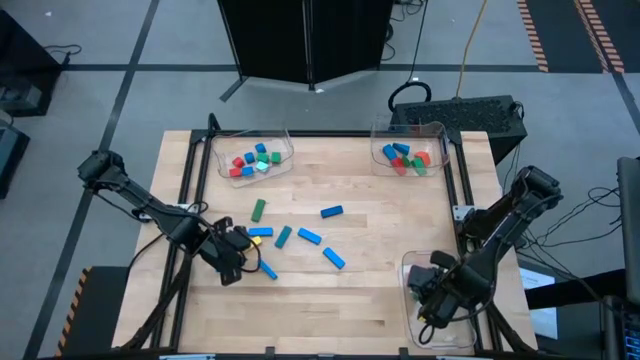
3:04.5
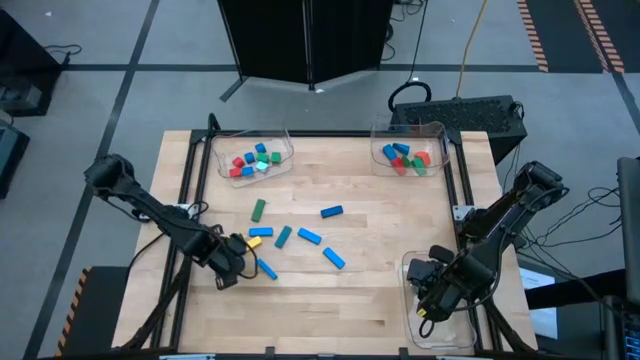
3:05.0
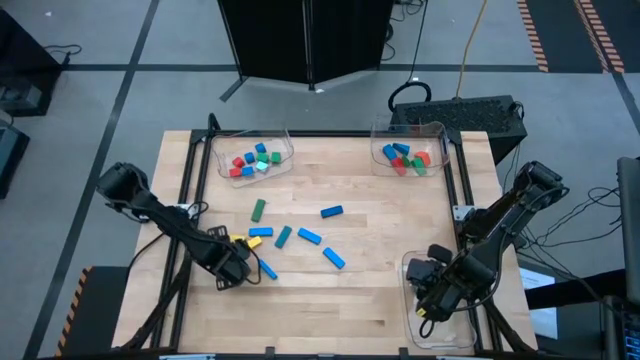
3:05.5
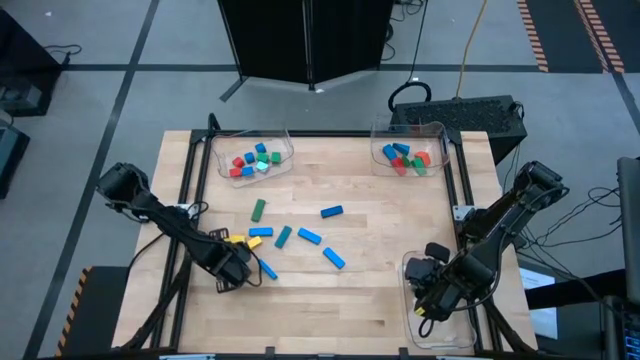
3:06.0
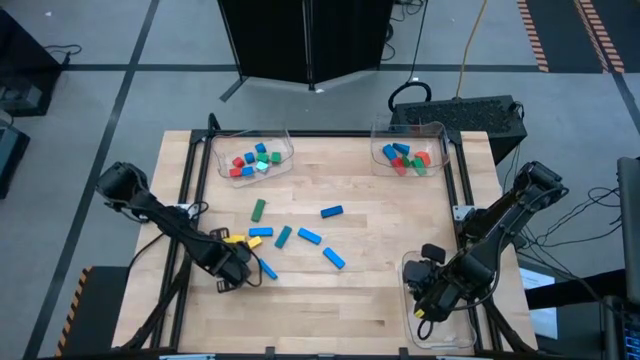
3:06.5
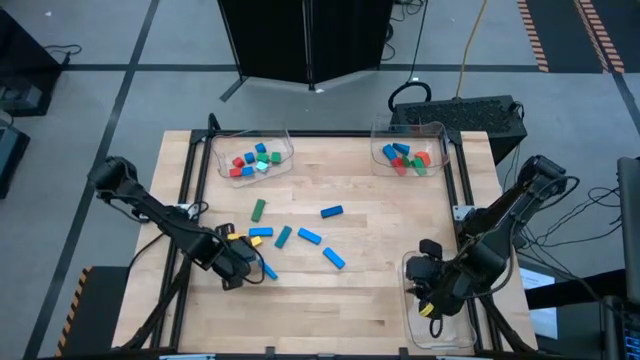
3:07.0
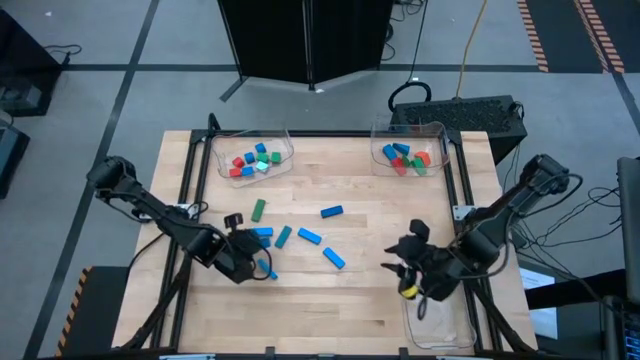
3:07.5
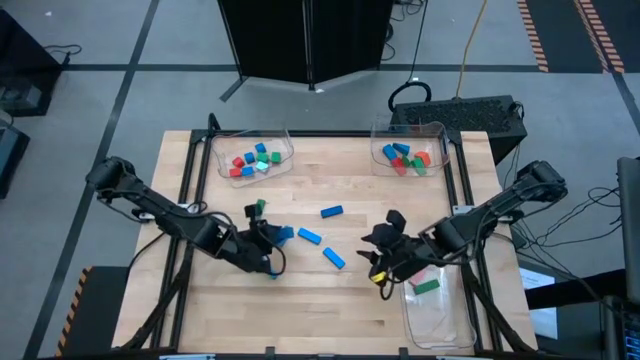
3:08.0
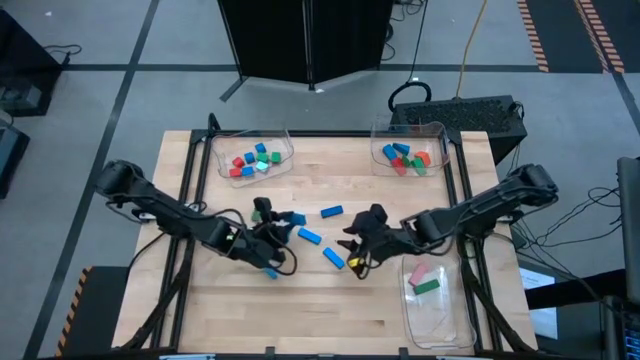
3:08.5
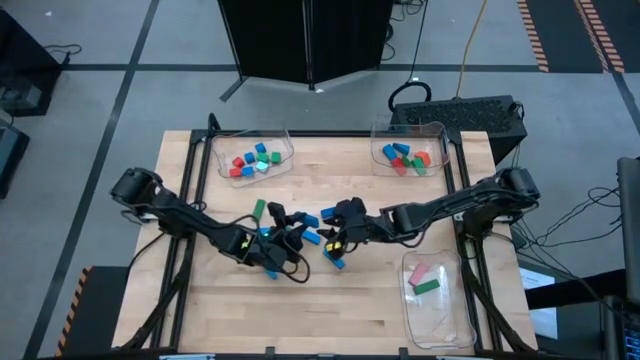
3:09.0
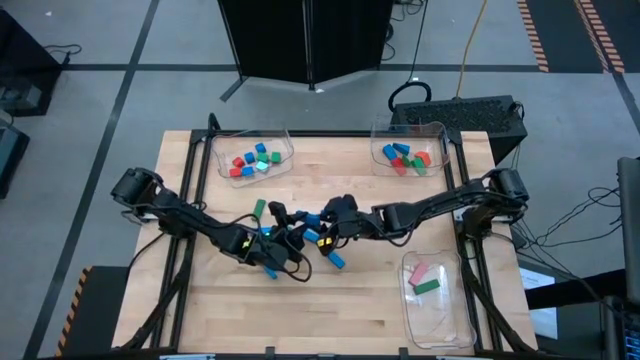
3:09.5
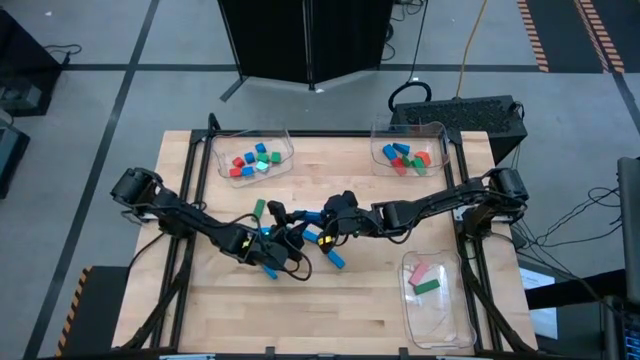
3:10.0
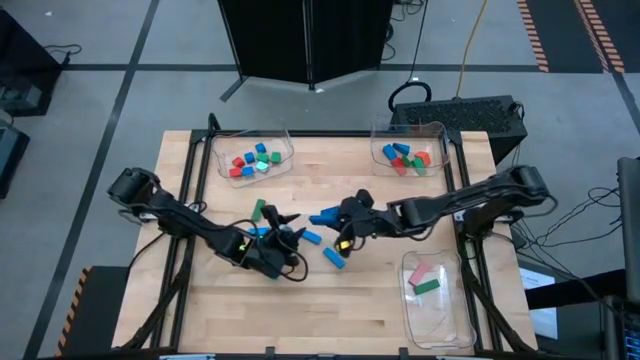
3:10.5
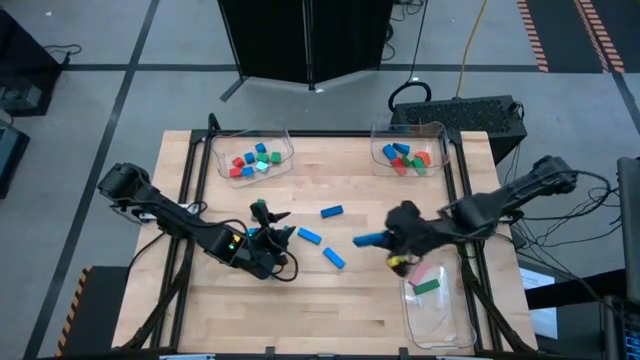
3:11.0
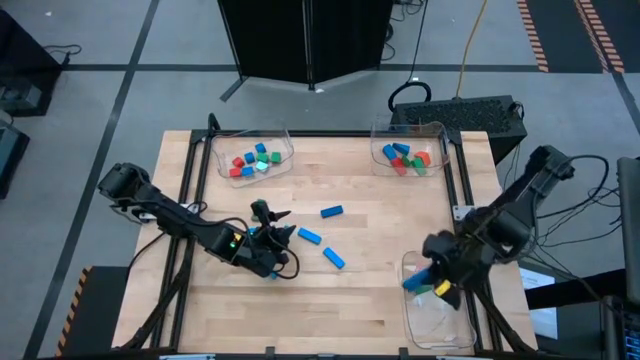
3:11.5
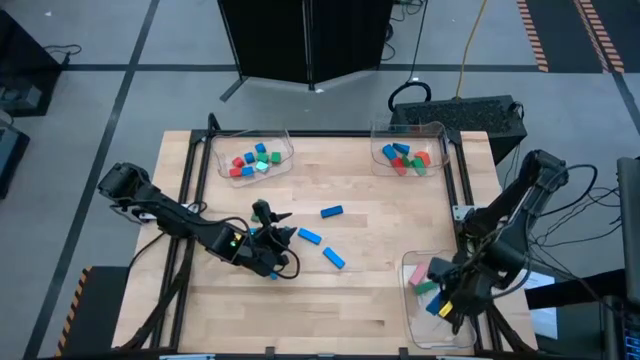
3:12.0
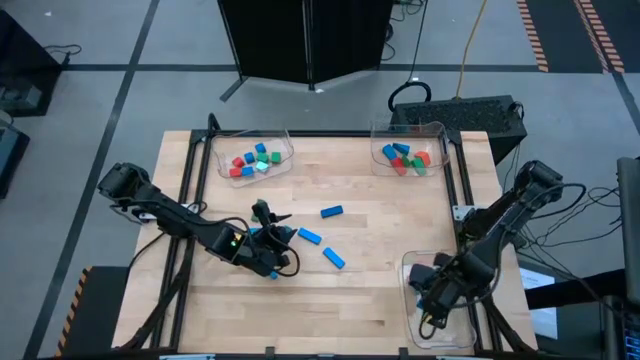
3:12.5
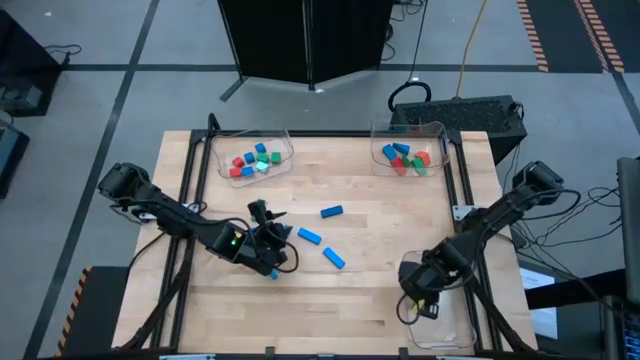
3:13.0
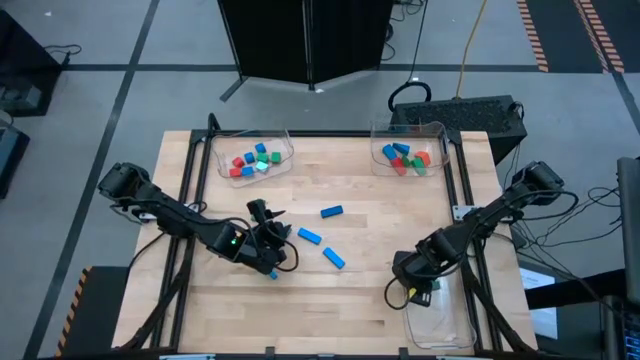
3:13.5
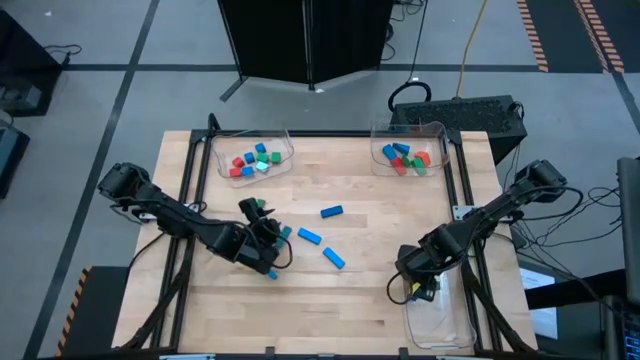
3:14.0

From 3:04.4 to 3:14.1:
Task: Sort blocks by size
Put the blue rectangular block into the bottom right transparent bin

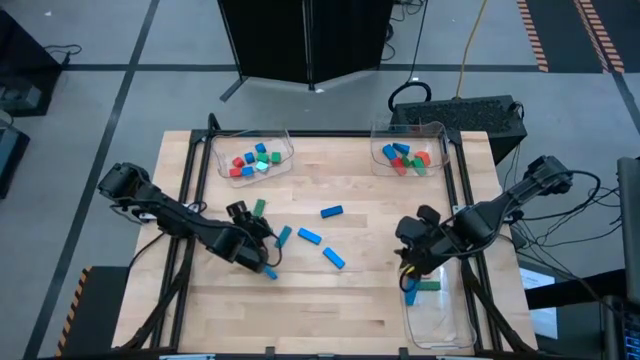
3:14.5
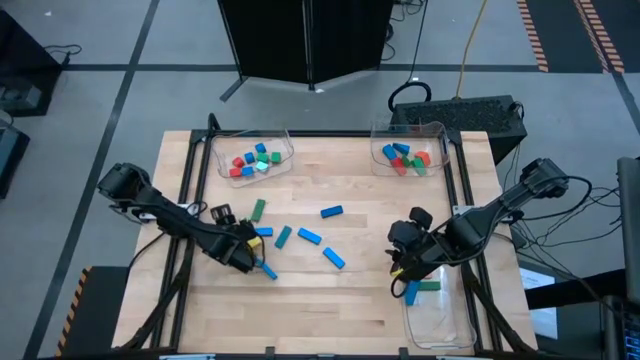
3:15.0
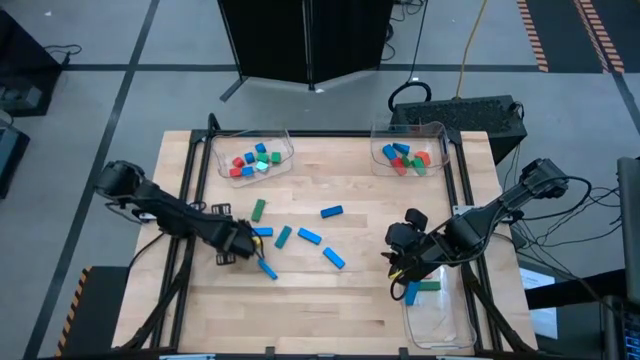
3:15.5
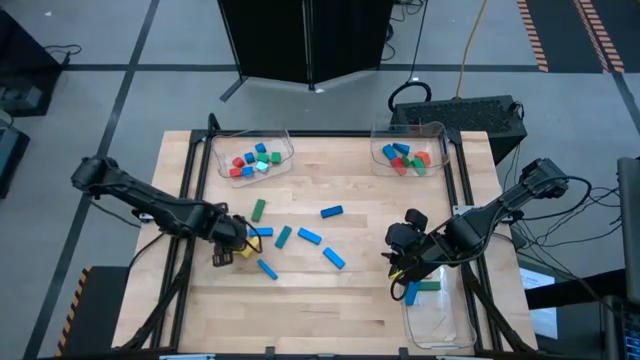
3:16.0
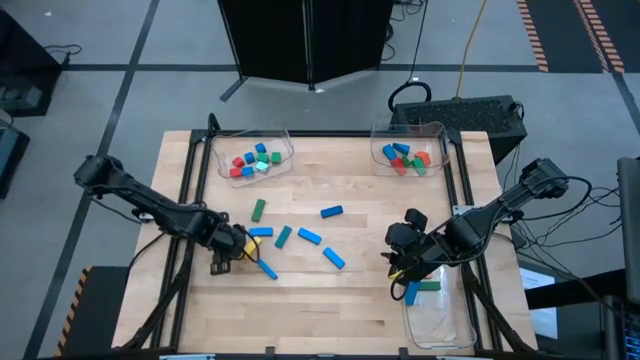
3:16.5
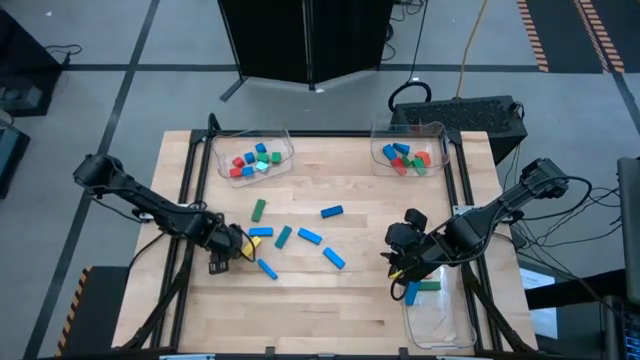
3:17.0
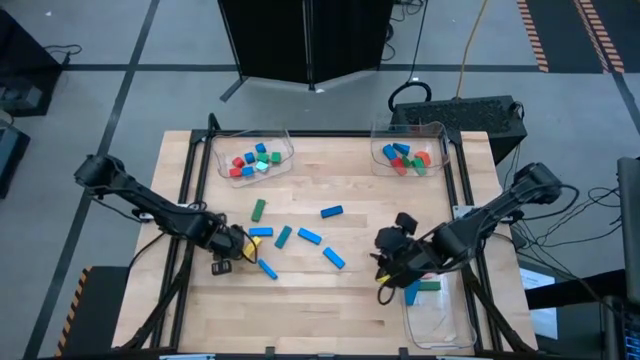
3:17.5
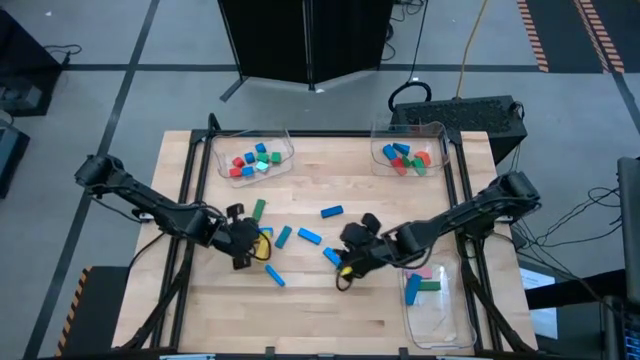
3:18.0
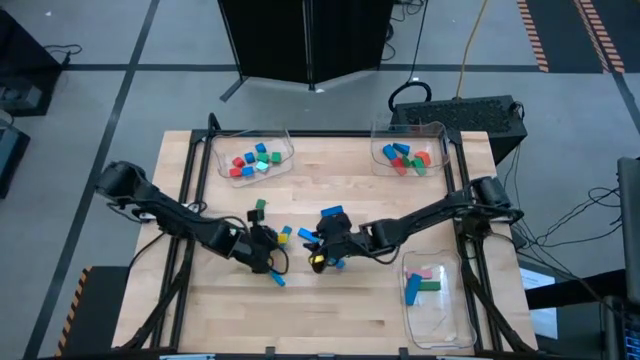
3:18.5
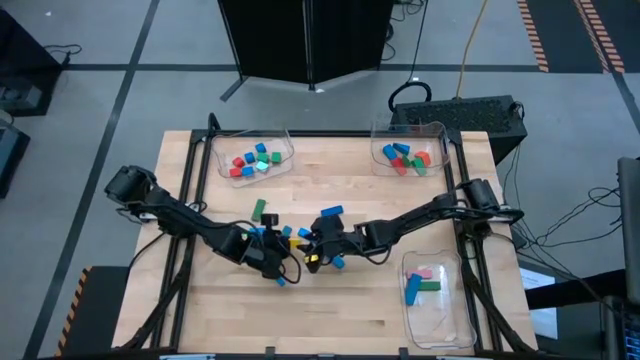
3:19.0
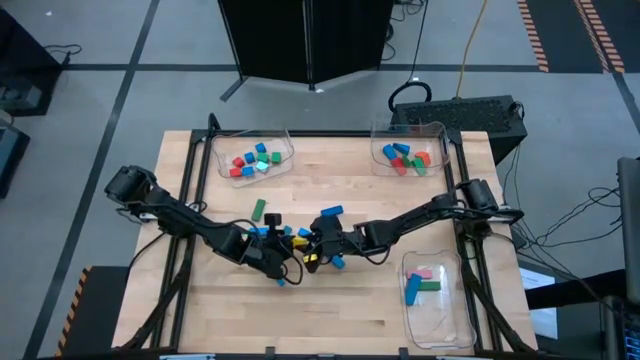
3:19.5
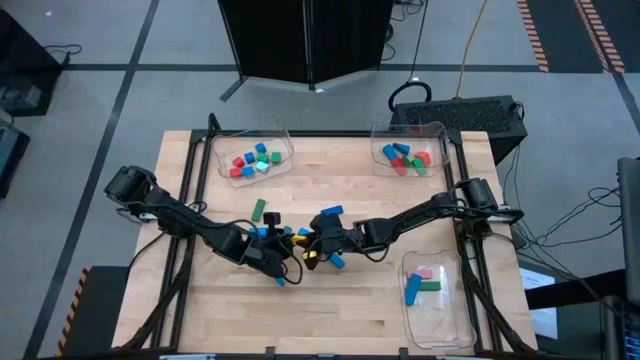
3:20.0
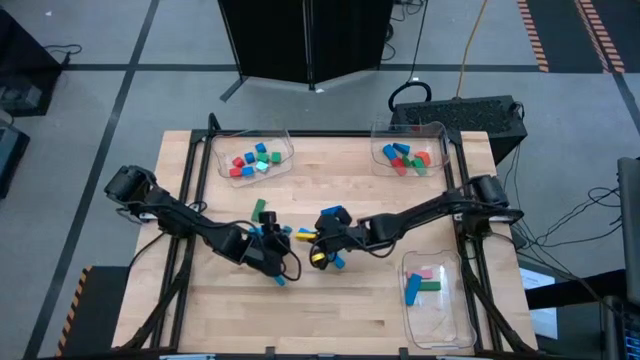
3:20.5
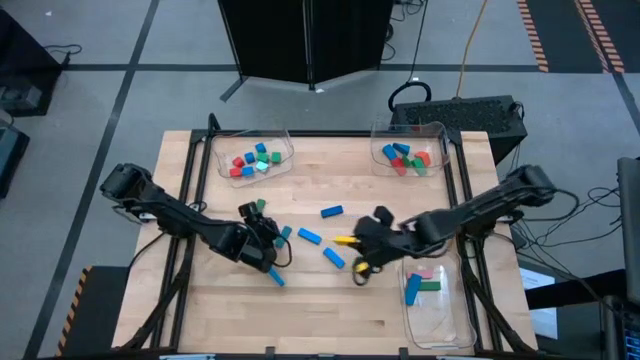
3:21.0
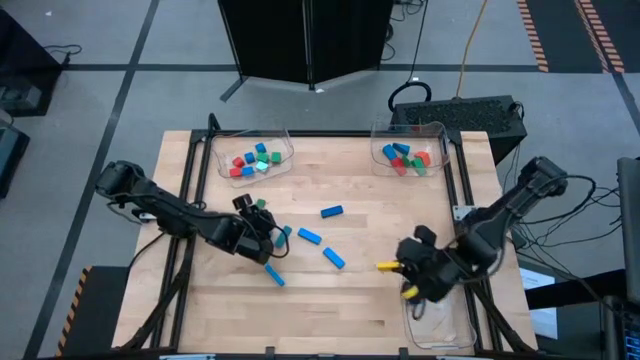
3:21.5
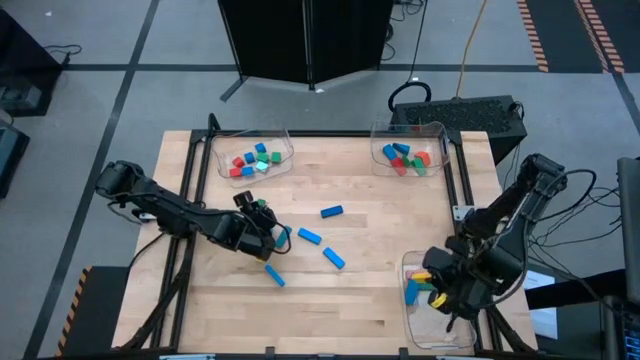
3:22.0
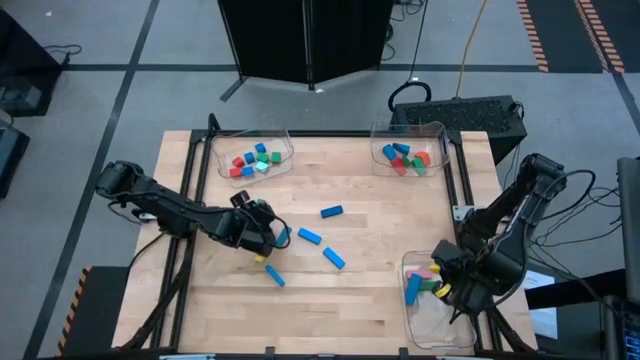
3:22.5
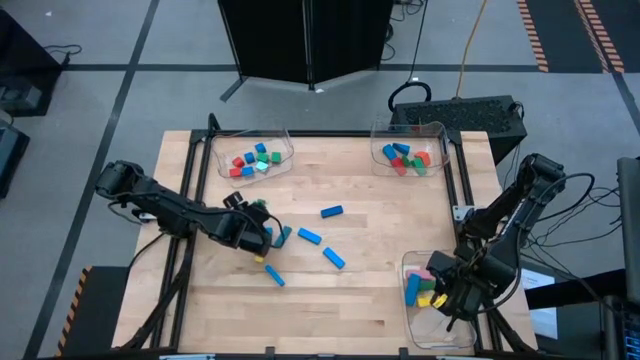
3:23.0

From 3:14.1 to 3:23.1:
Put the yellow rectangular block into the bottom right transparent bin

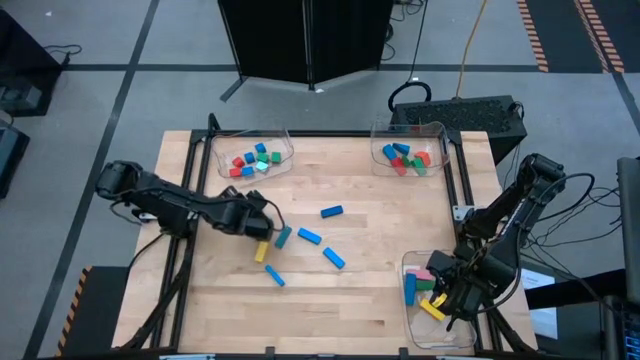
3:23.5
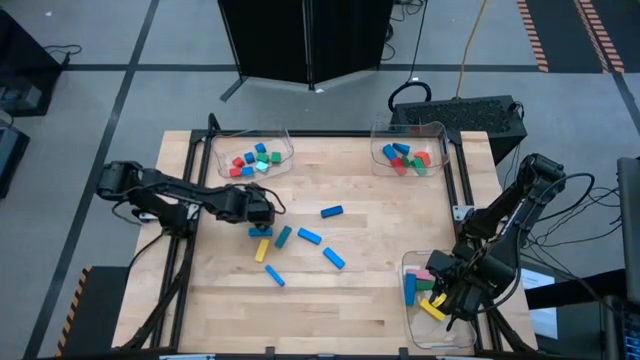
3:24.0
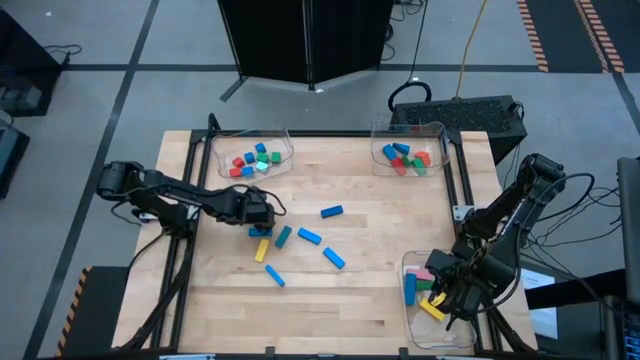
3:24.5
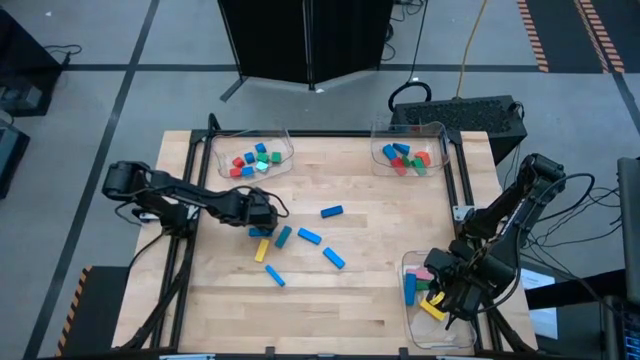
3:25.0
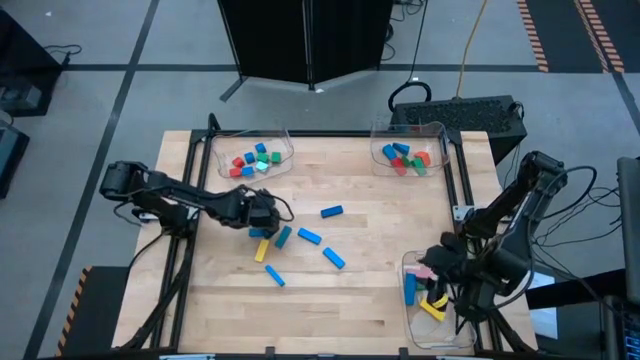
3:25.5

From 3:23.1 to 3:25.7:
Put the green rectangular block into the bottom right transparent bin
